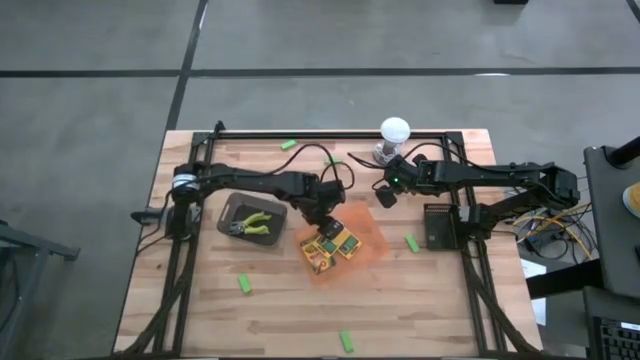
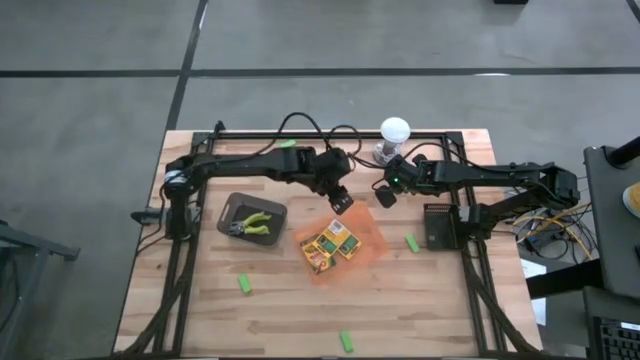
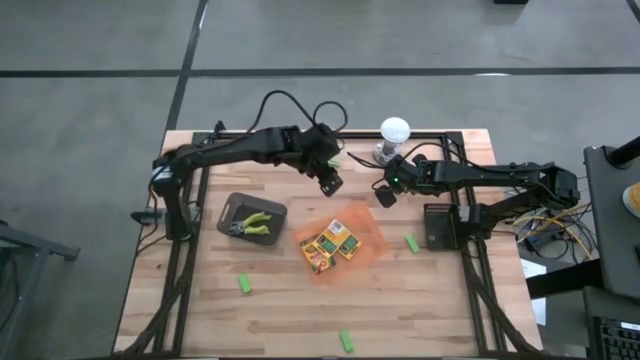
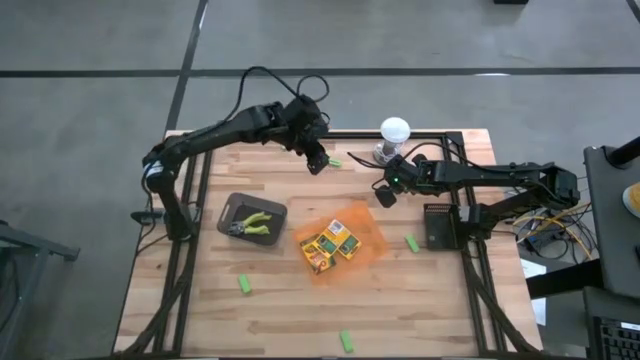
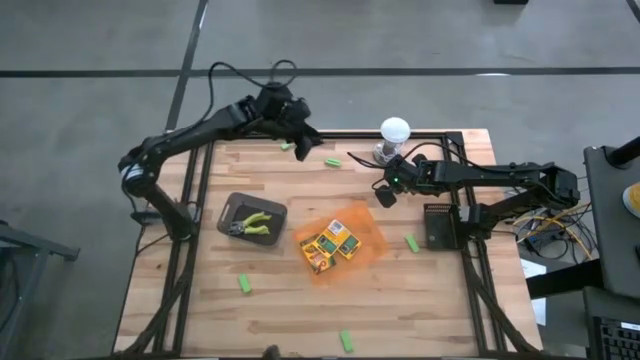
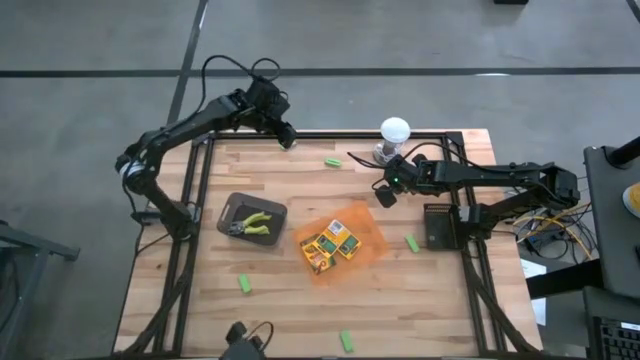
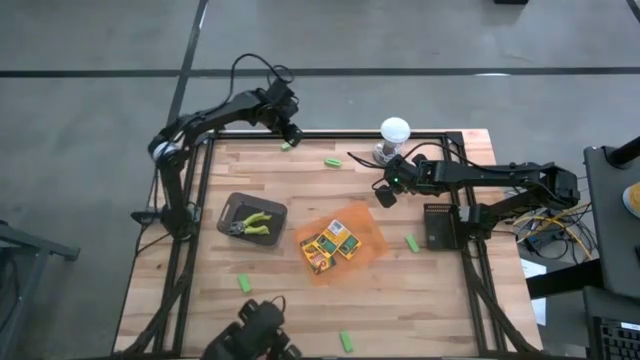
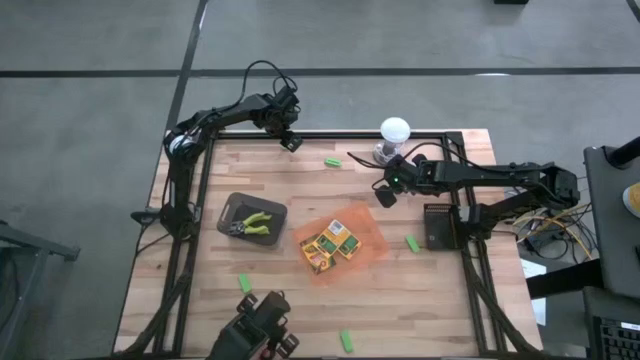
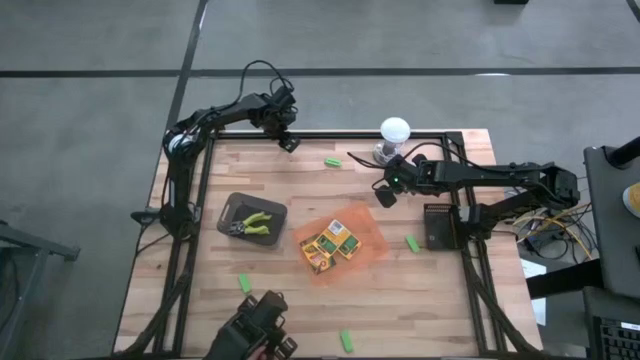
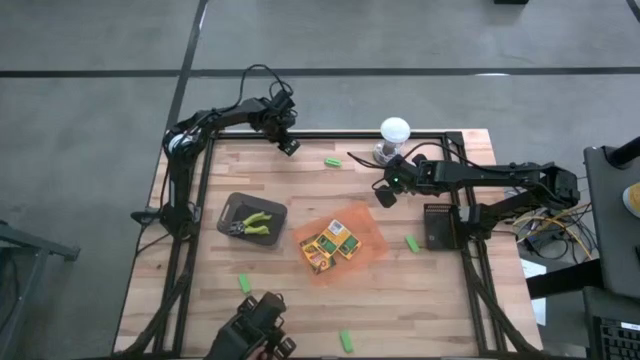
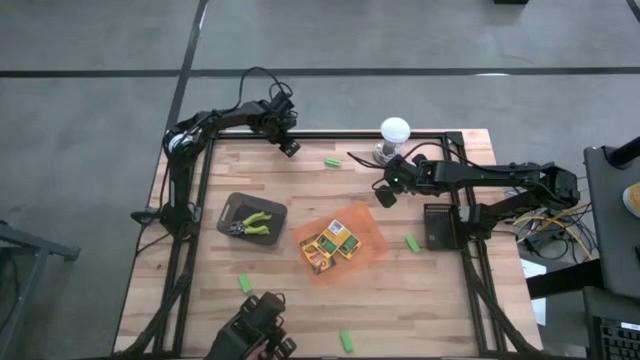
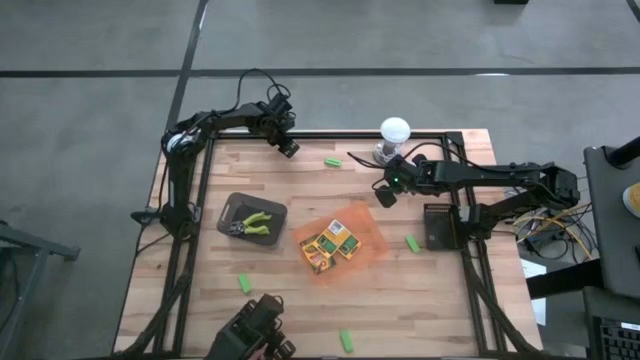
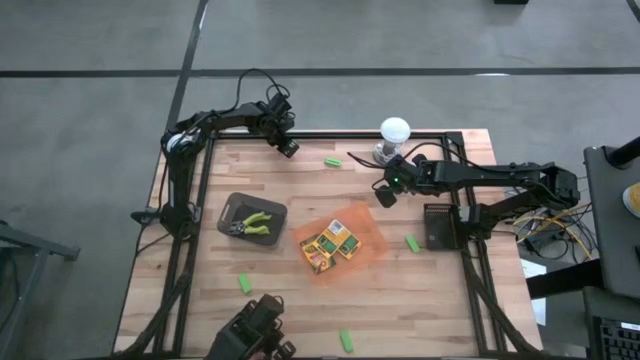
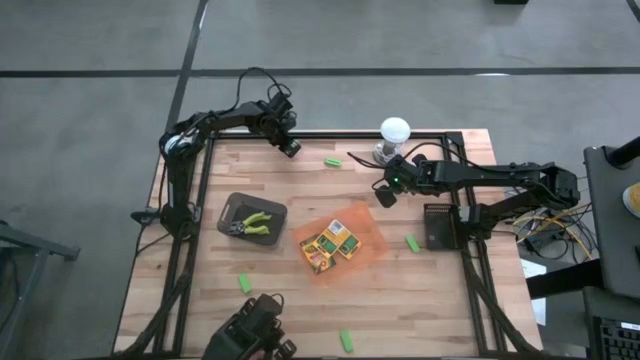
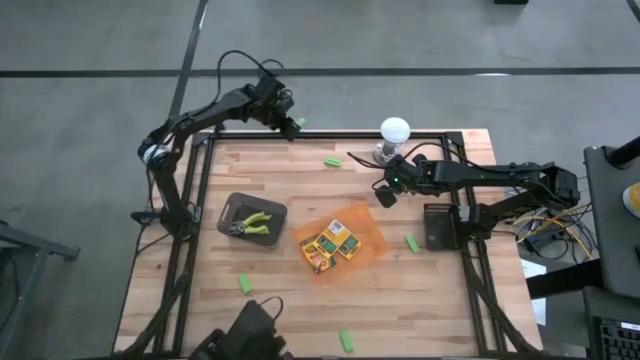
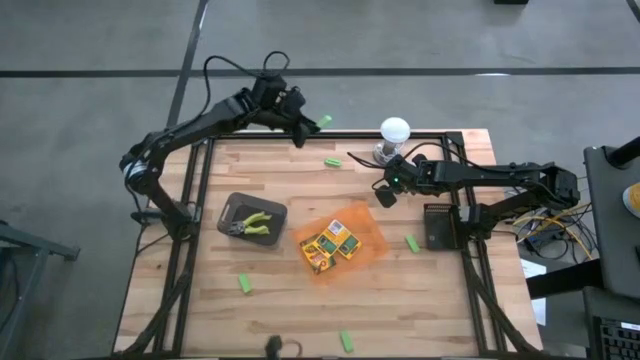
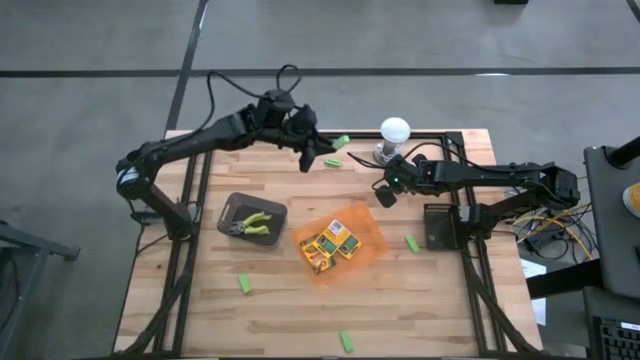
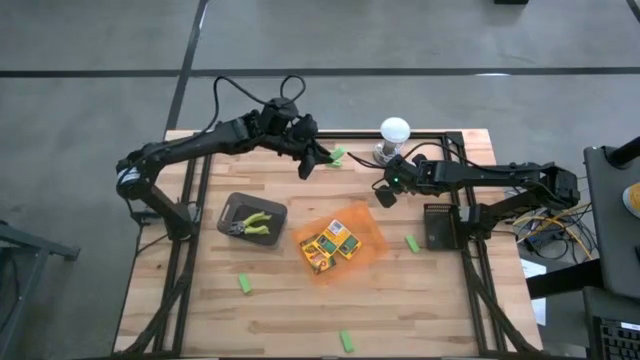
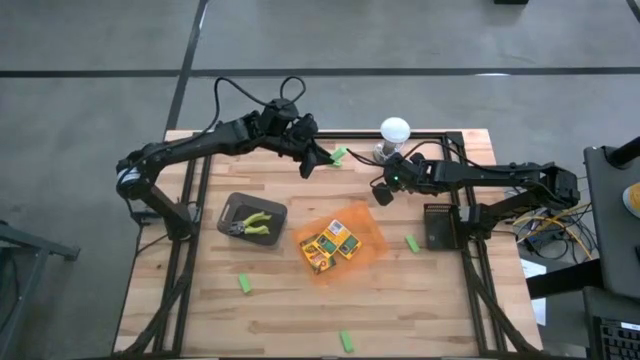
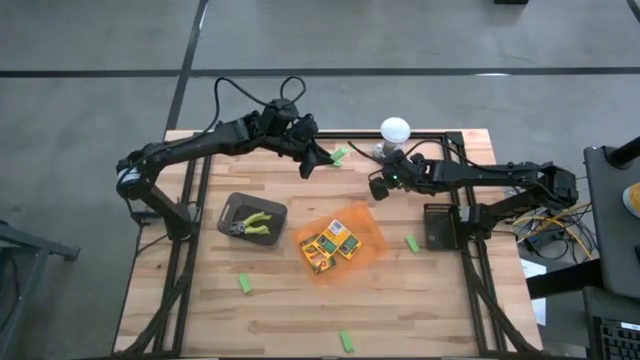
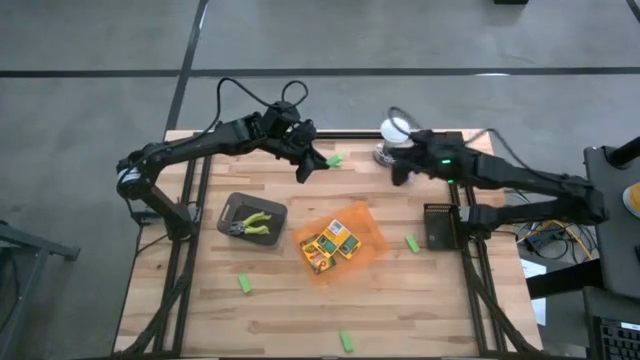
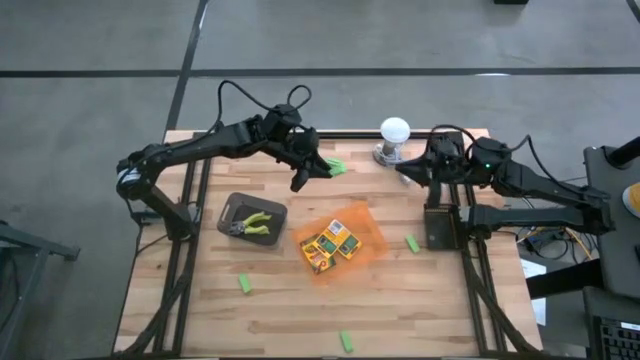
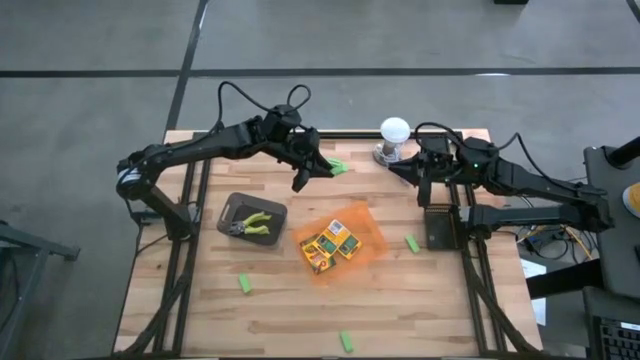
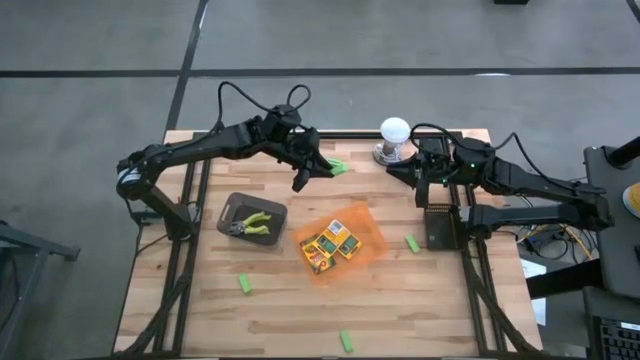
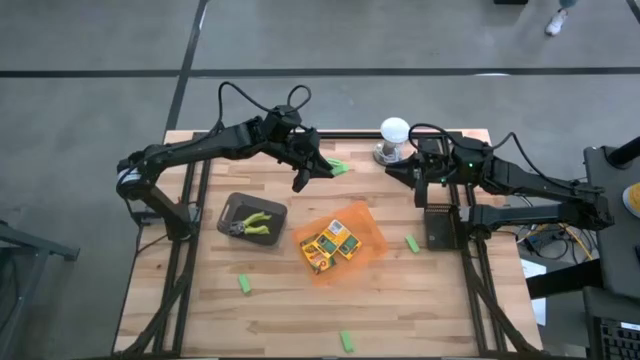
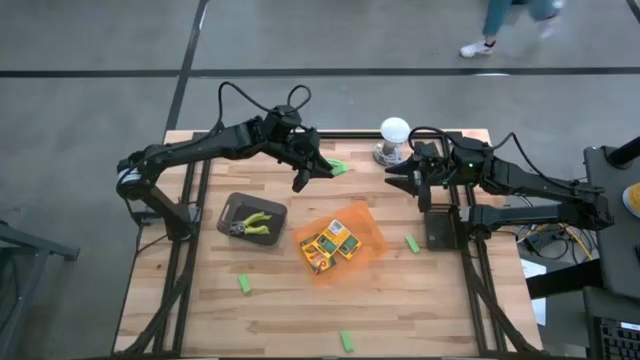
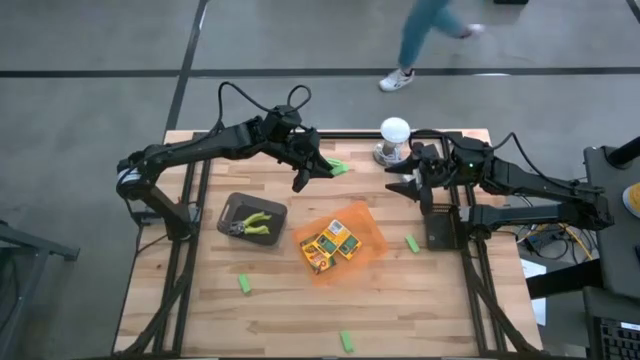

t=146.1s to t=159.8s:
Task: Pick & Place School Supplies
Put the green eraser into the black basket

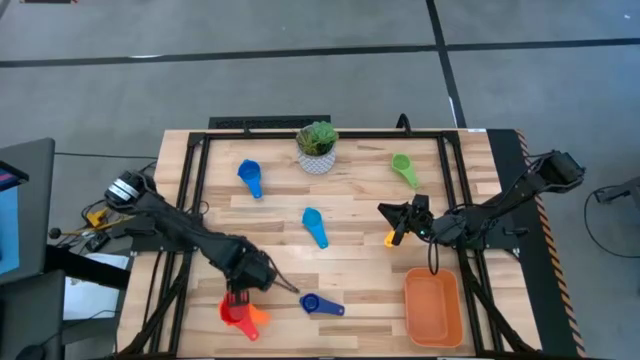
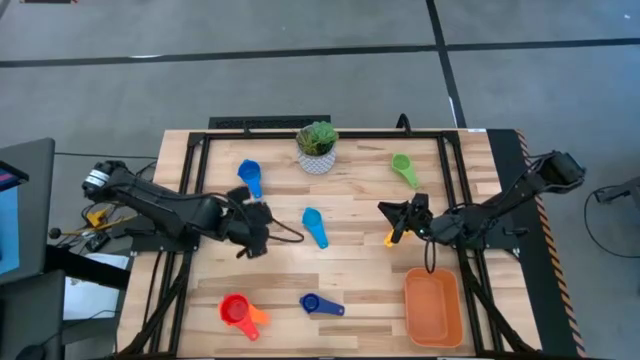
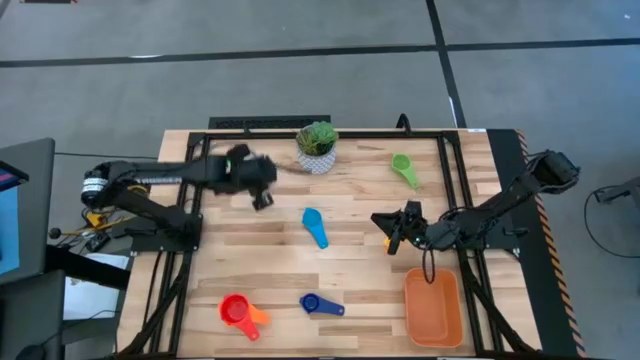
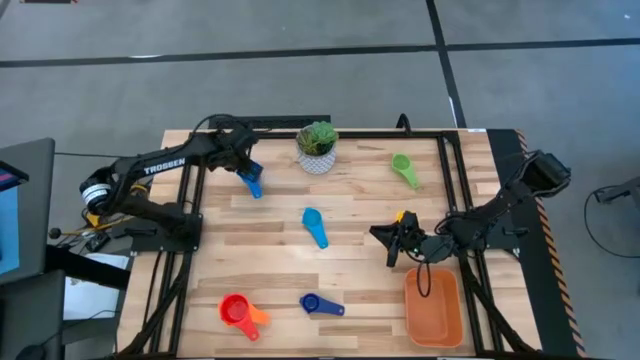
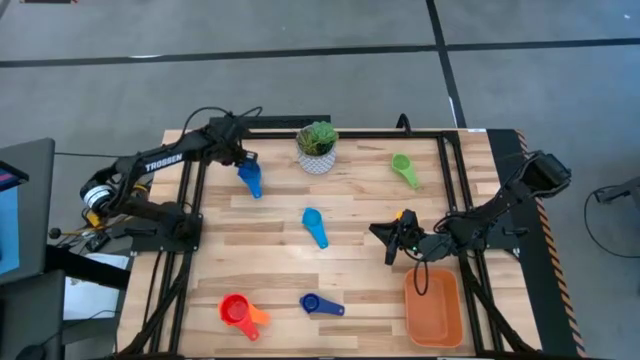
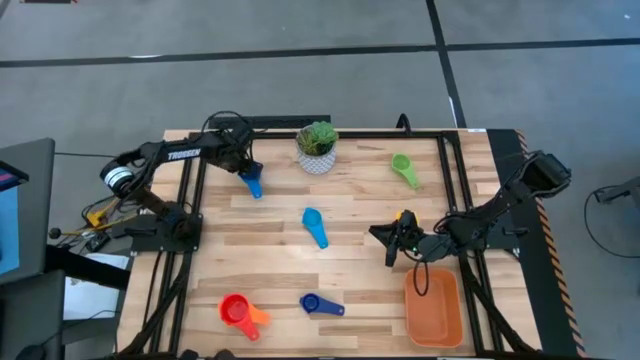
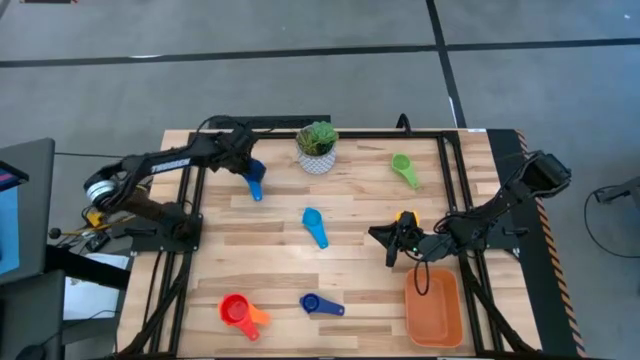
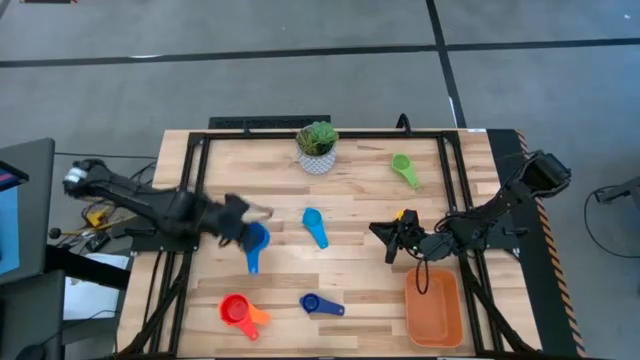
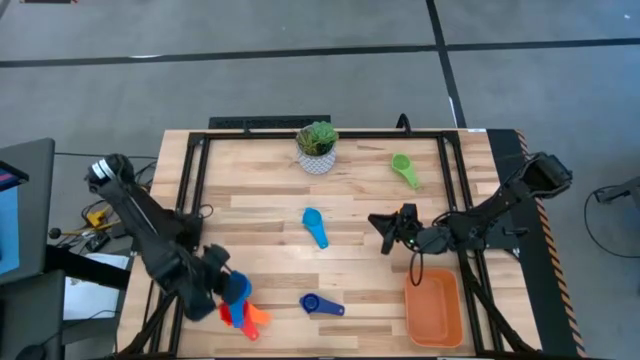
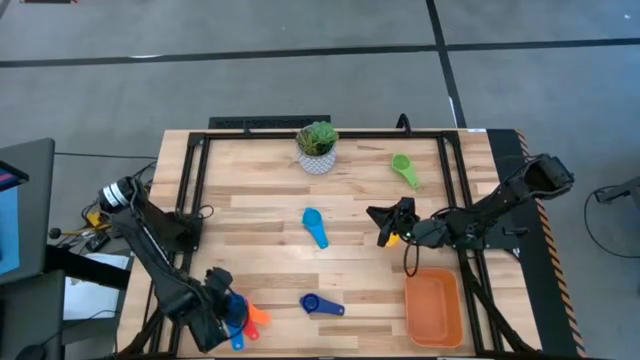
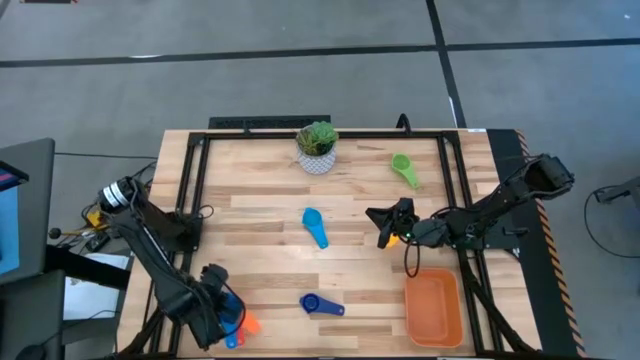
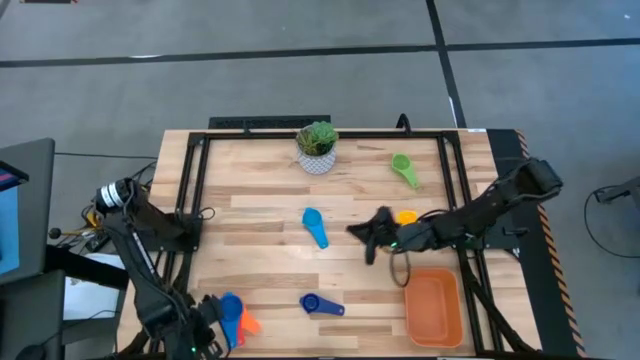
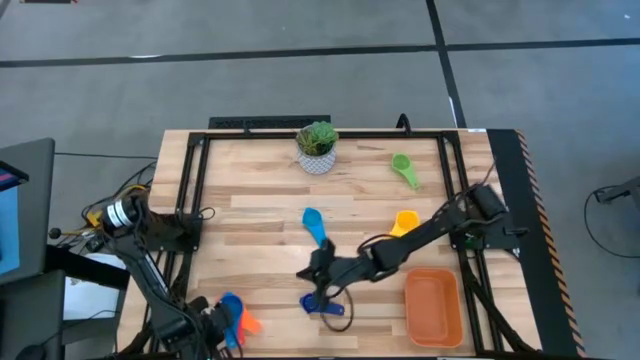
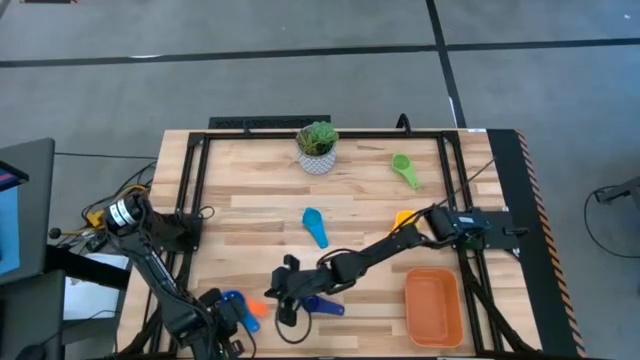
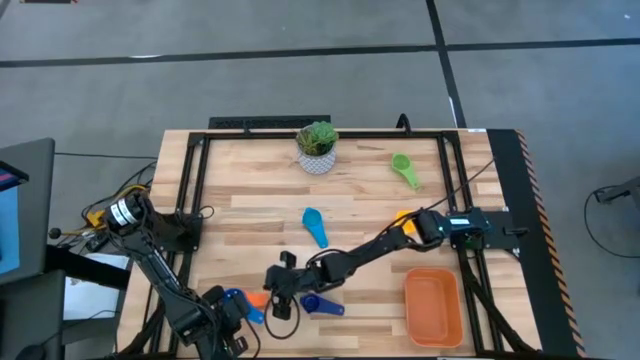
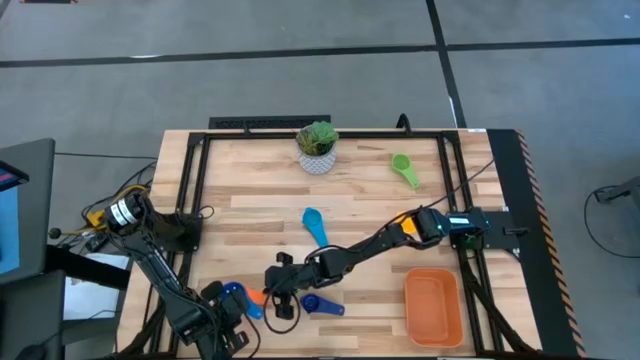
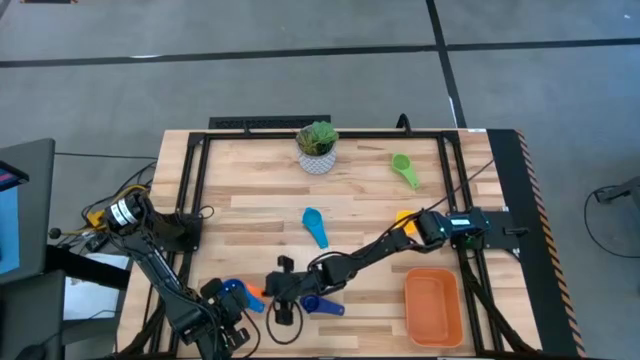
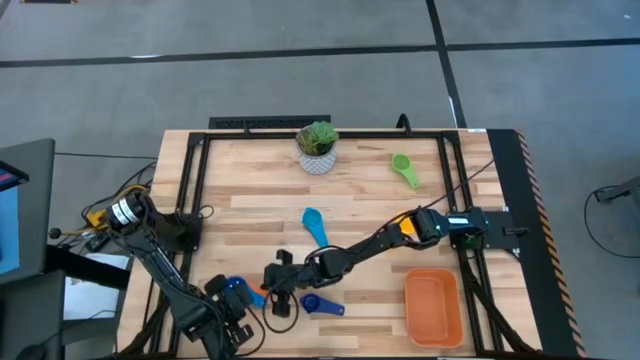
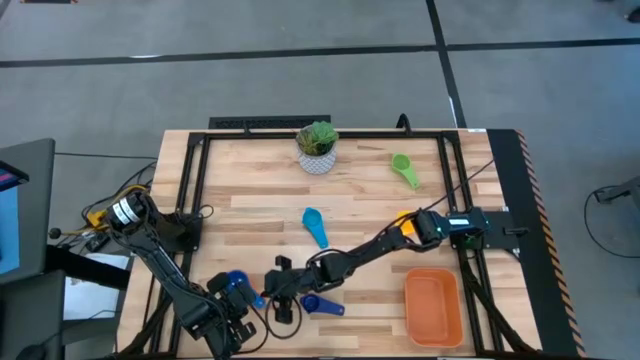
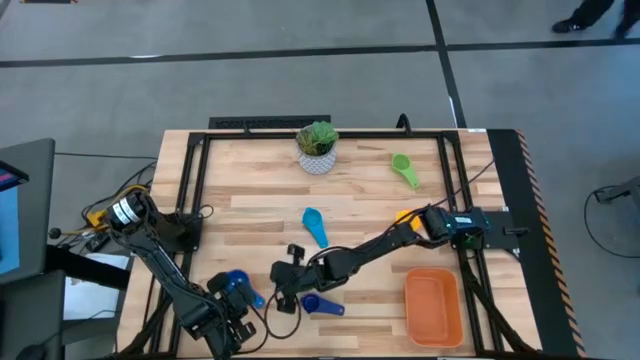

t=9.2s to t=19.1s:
Task: Nest measuring cups in basket
Stack the blue measuring cup on top of the red measuring cup
